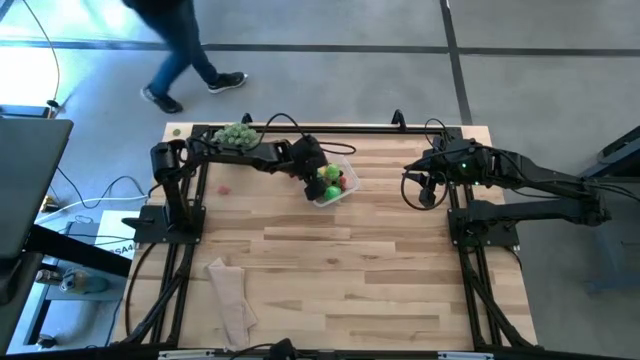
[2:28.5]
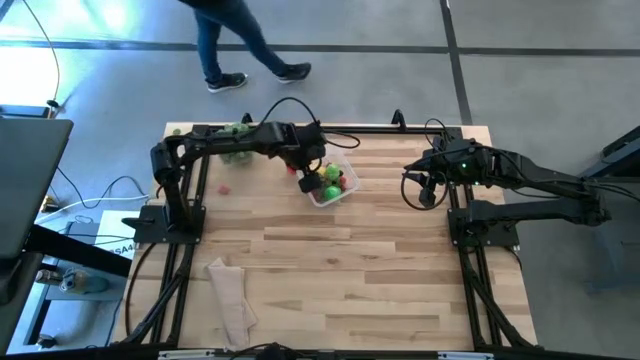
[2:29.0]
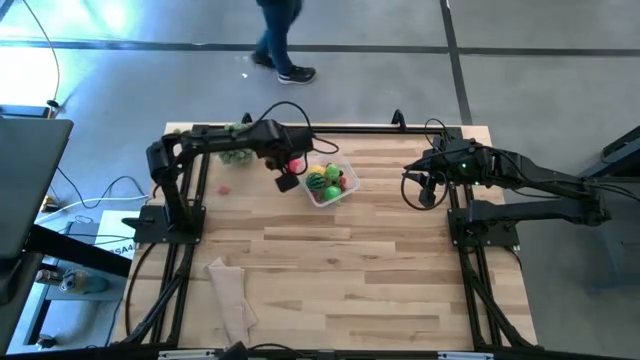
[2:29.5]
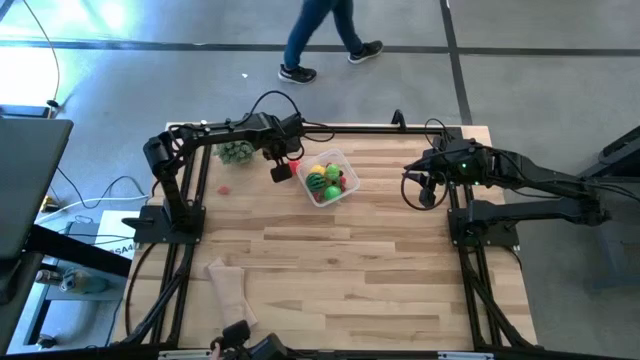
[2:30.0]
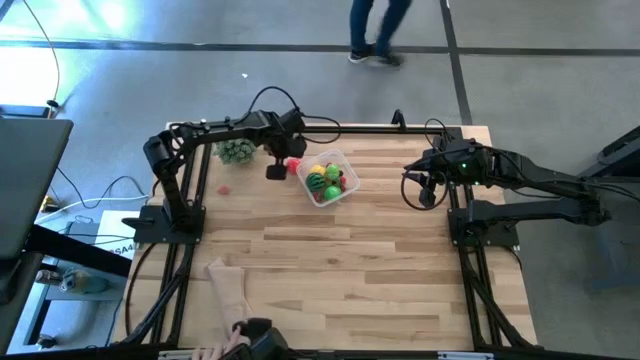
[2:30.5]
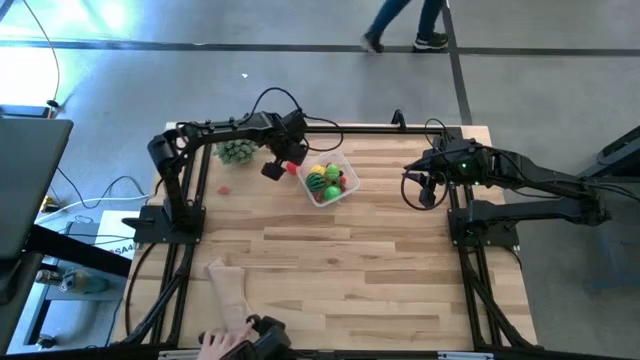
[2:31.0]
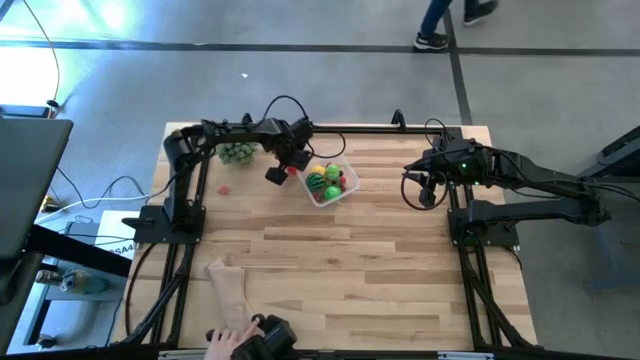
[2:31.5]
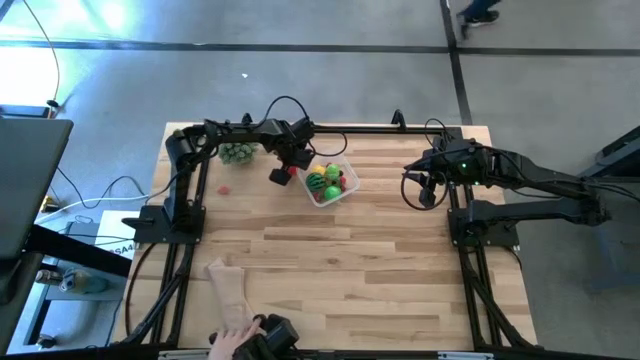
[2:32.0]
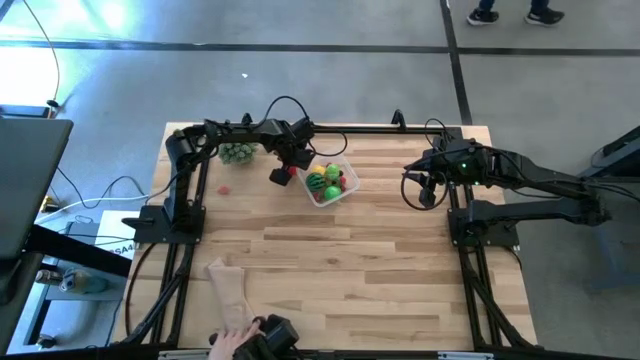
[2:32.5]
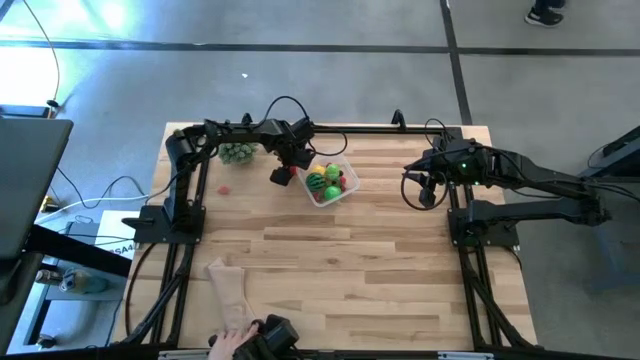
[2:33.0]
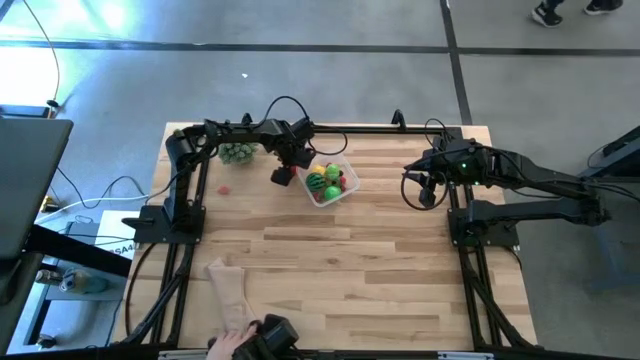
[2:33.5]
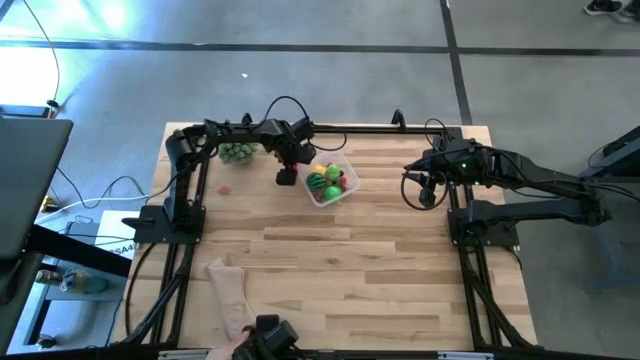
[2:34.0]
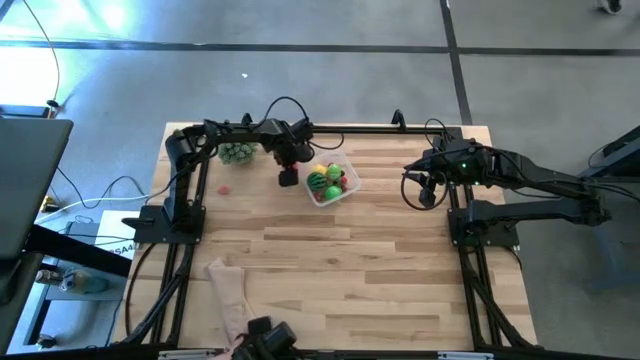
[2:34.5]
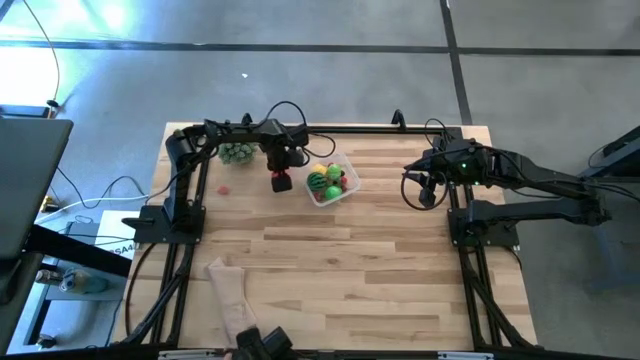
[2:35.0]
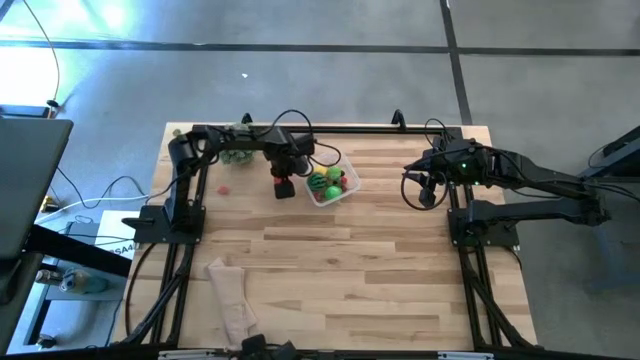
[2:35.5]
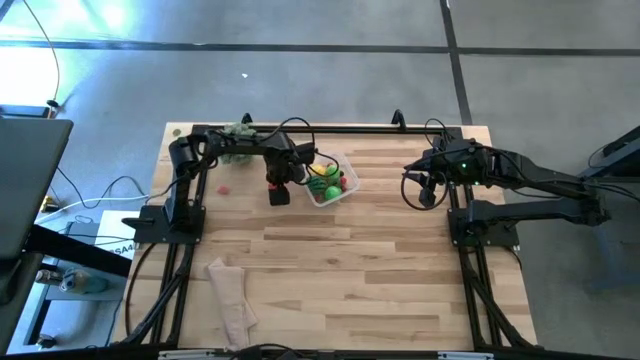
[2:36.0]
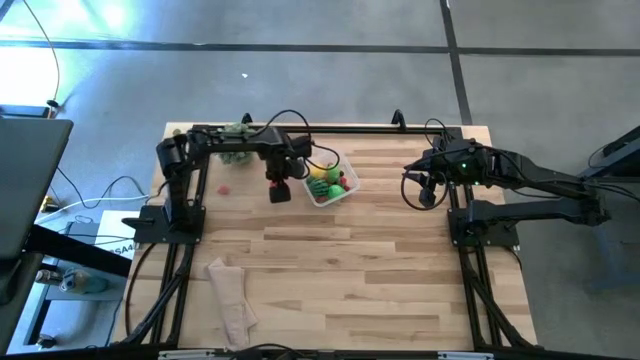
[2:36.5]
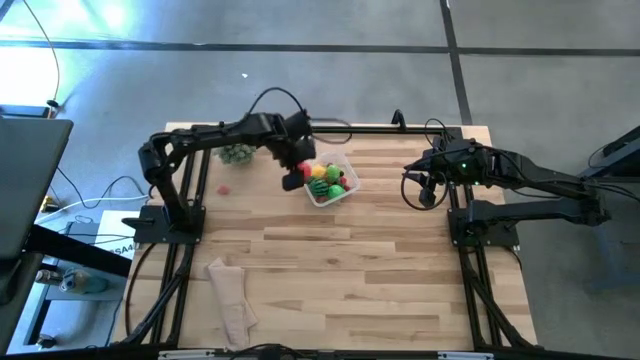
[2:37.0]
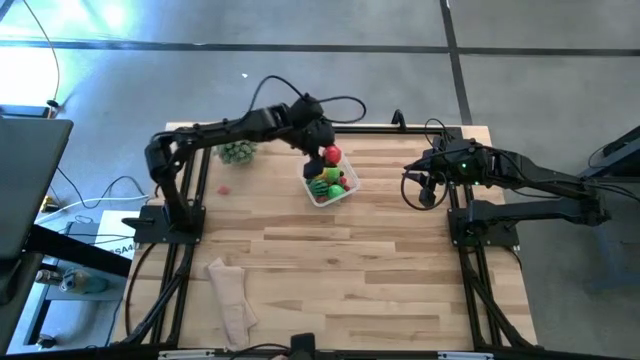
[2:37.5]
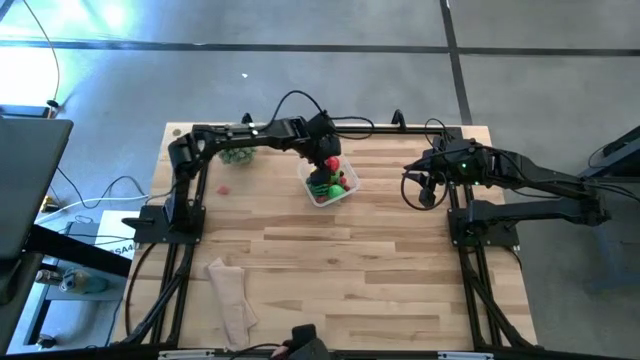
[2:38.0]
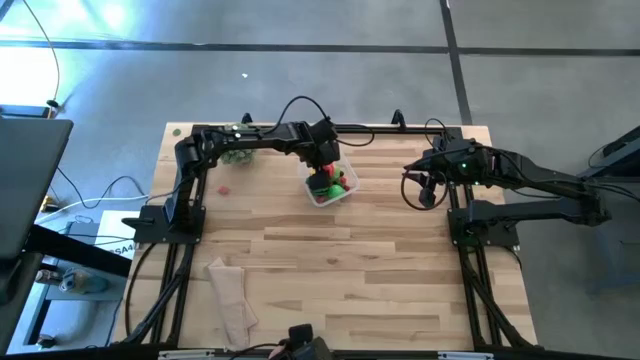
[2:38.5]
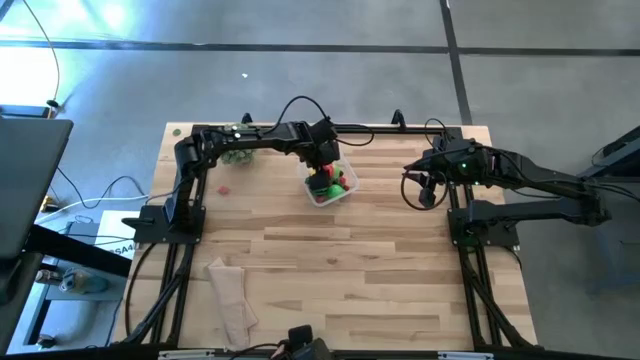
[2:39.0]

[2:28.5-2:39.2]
Task: Pick and placing Produce into tupperware
Put the red tomato into the transparent container

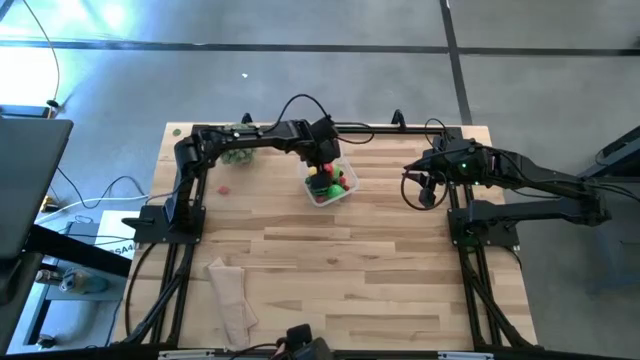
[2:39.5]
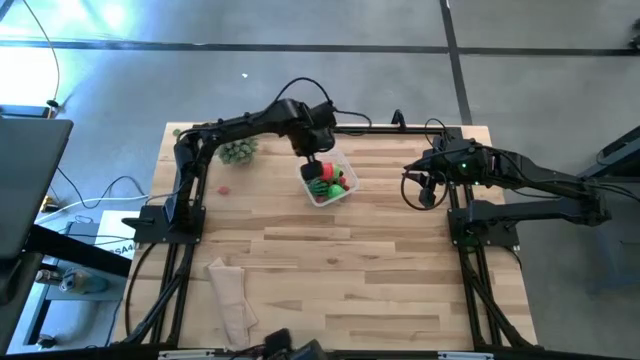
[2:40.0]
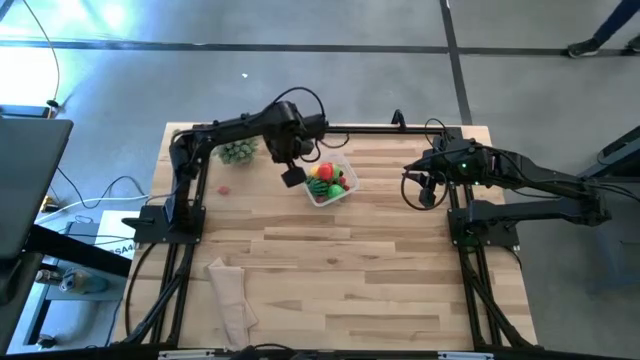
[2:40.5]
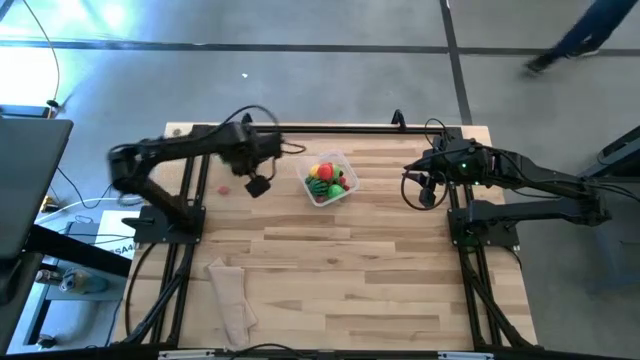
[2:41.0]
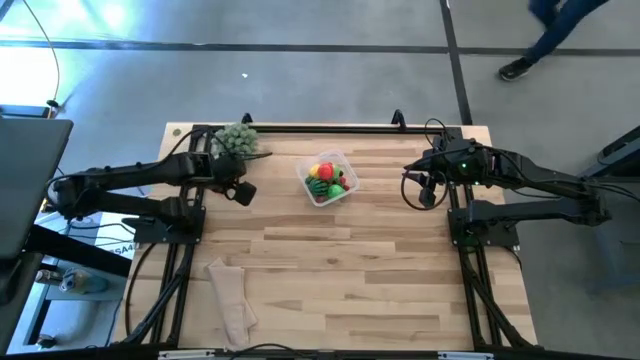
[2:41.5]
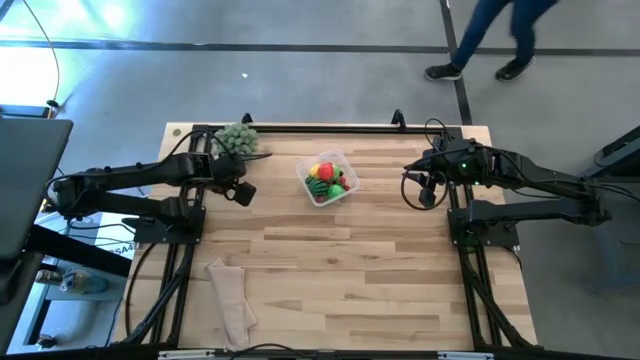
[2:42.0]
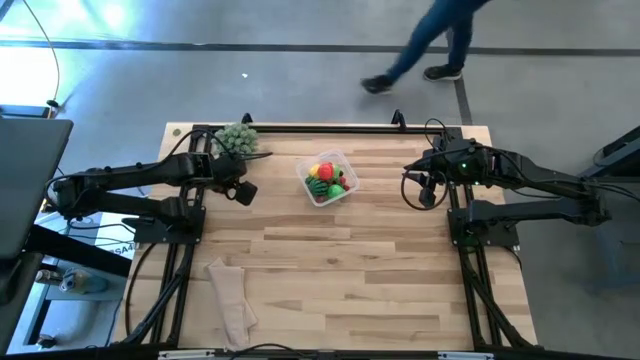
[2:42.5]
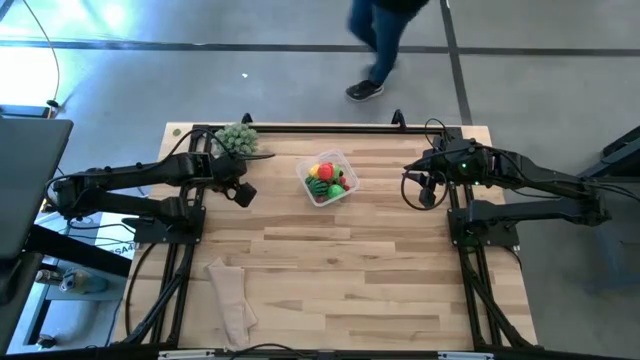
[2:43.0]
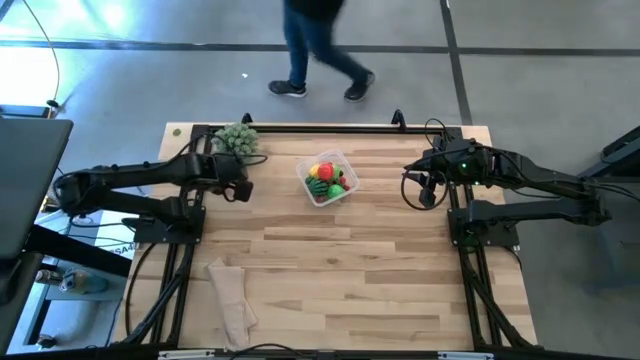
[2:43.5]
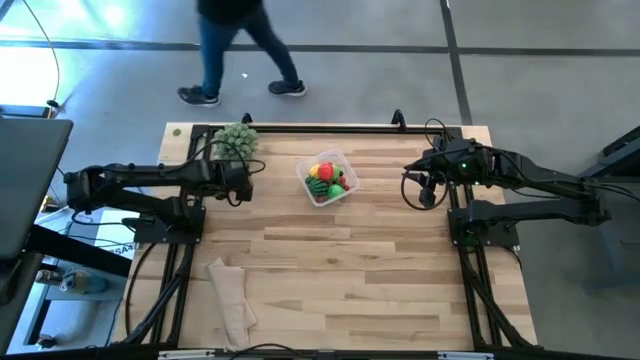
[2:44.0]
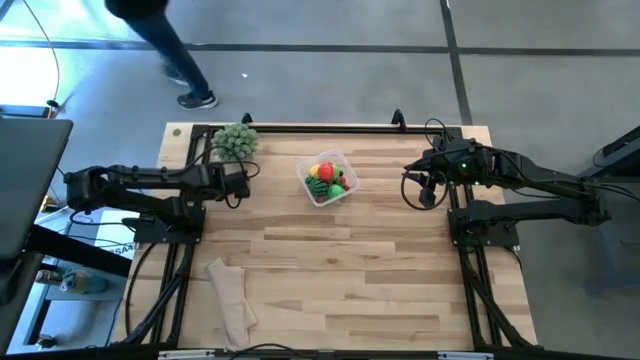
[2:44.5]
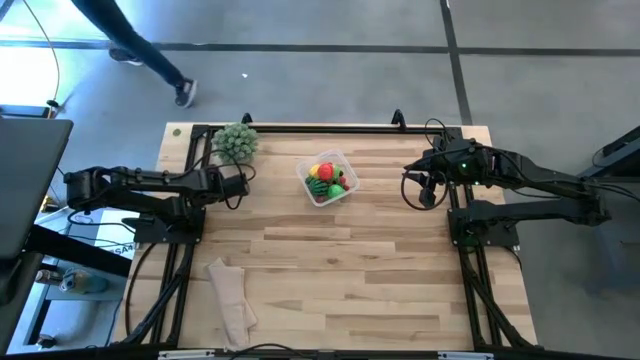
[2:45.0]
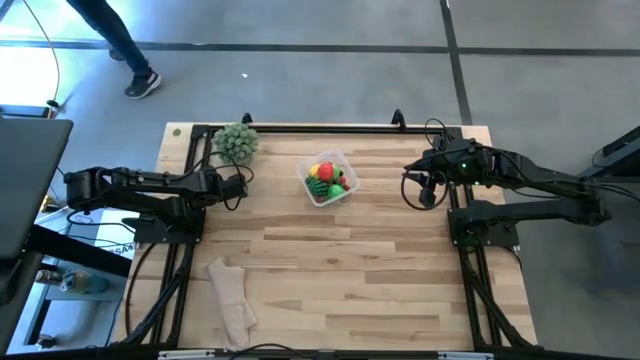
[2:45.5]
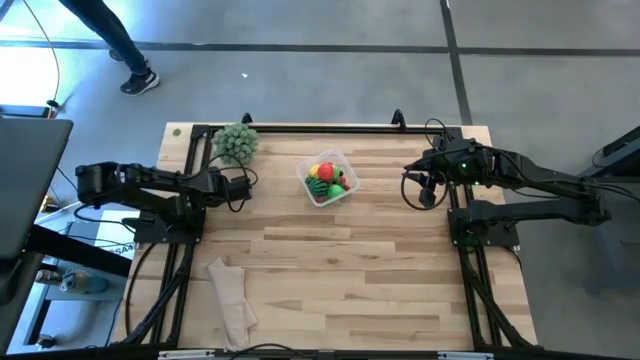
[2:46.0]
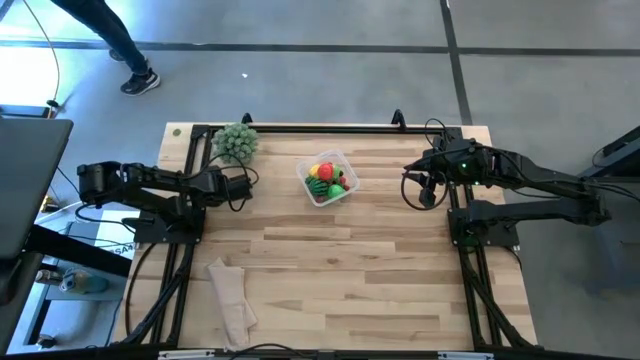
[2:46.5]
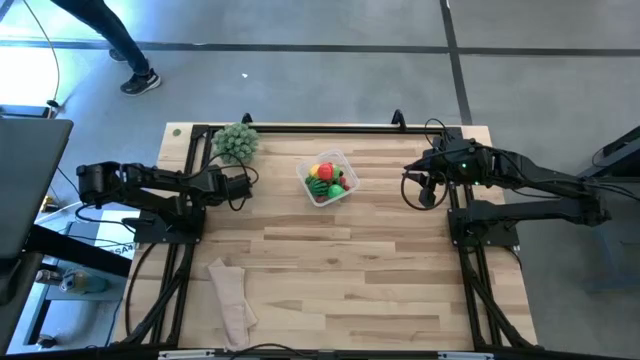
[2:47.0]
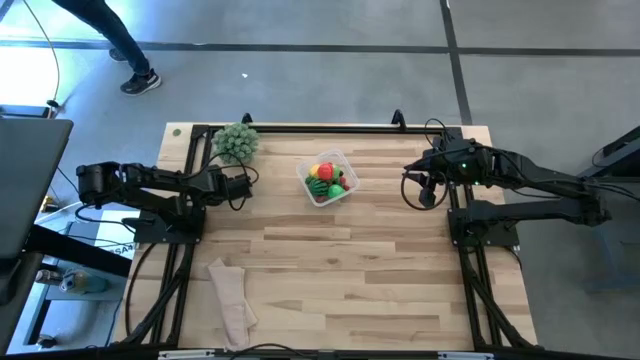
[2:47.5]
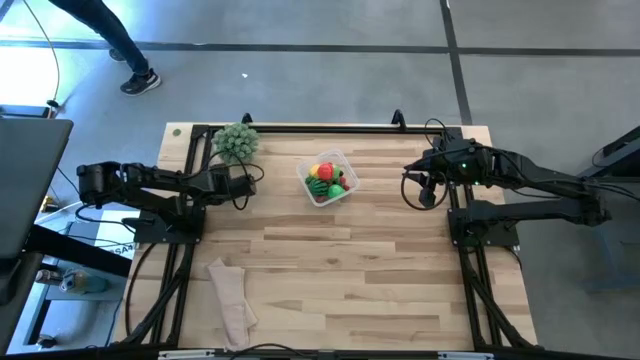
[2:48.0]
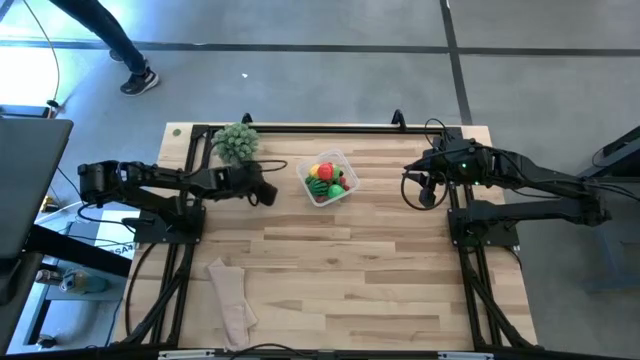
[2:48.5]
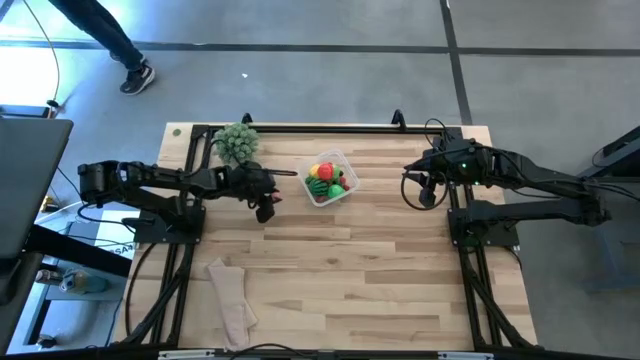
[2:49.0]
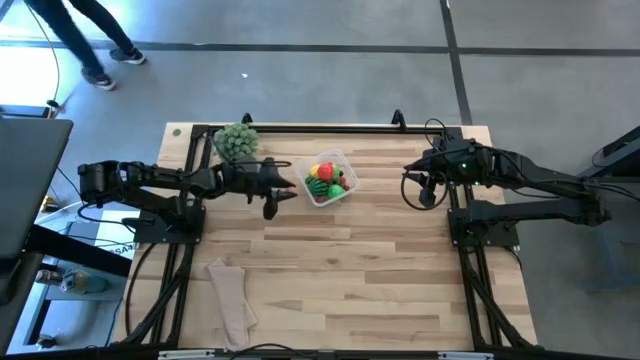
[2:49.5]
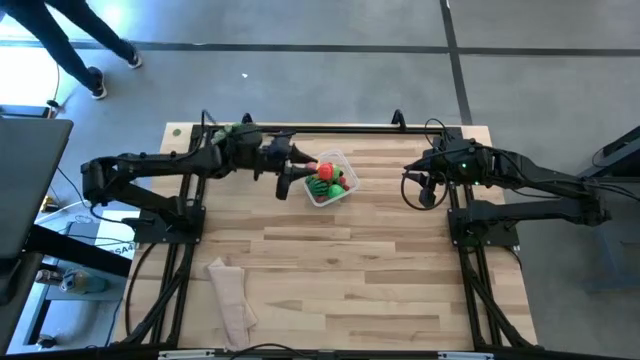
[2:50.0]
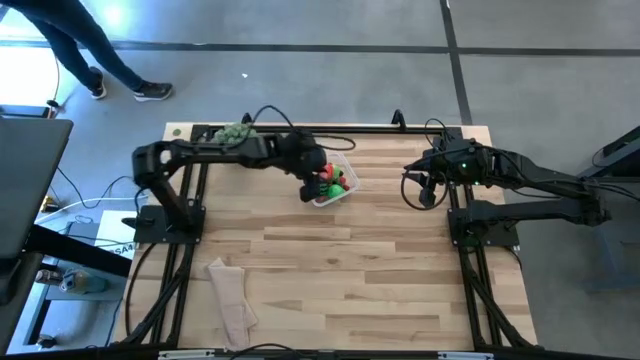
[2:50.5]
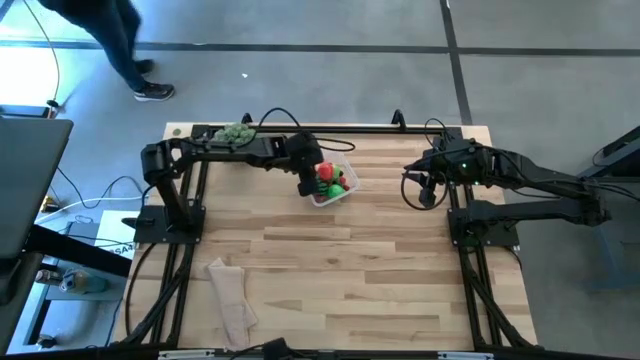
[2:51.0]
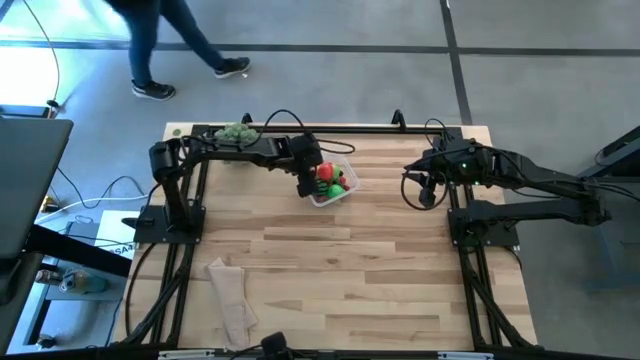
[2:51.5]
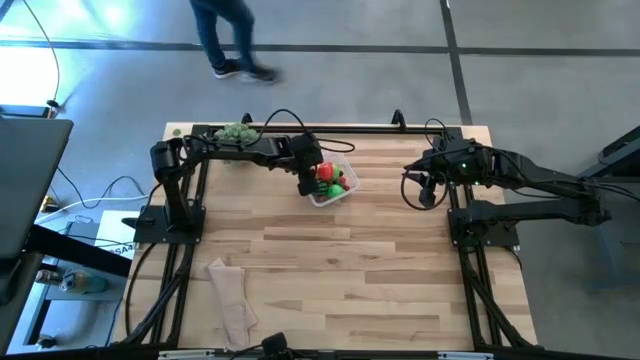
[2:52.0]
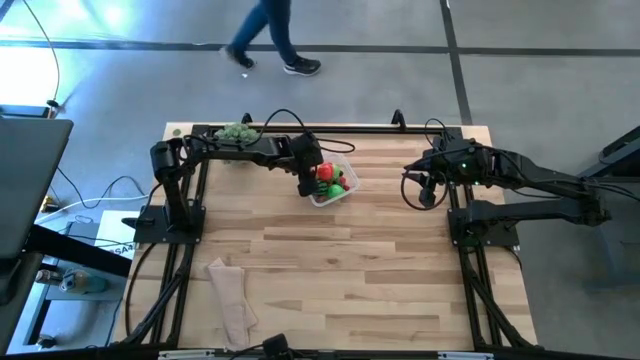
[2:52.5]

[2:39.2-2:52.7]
Put the pink peach into the transparent container
